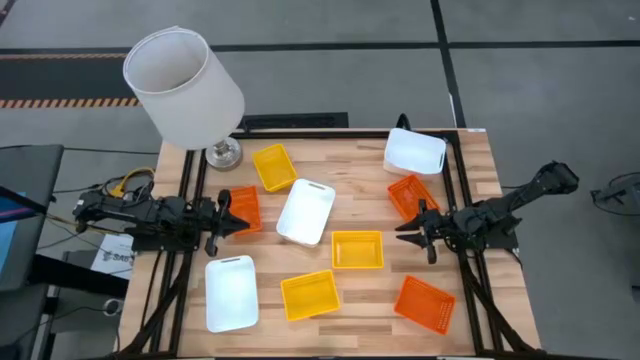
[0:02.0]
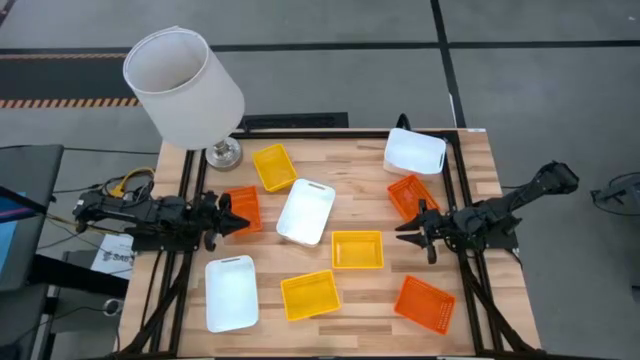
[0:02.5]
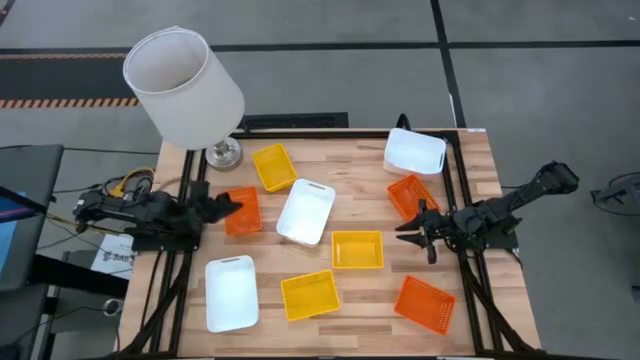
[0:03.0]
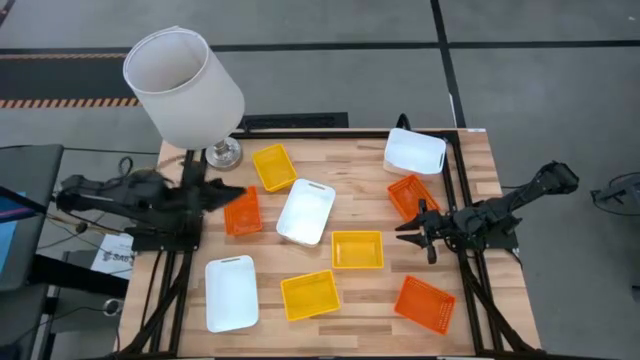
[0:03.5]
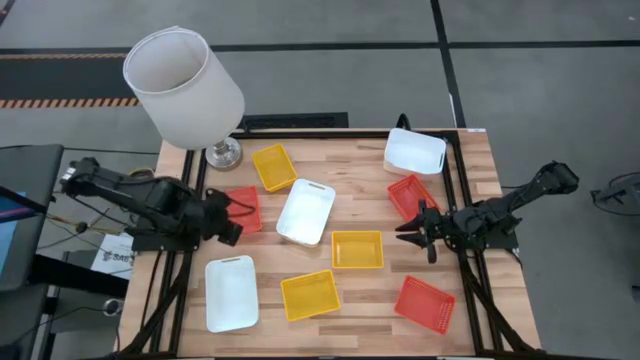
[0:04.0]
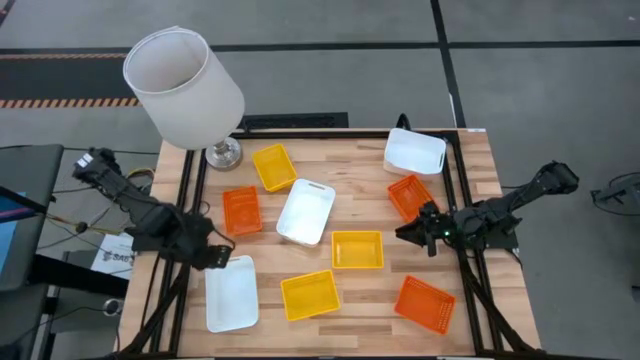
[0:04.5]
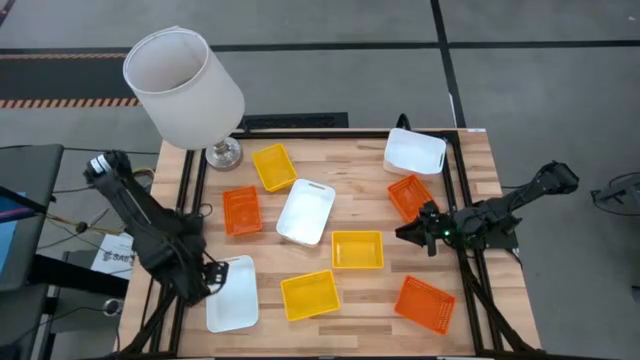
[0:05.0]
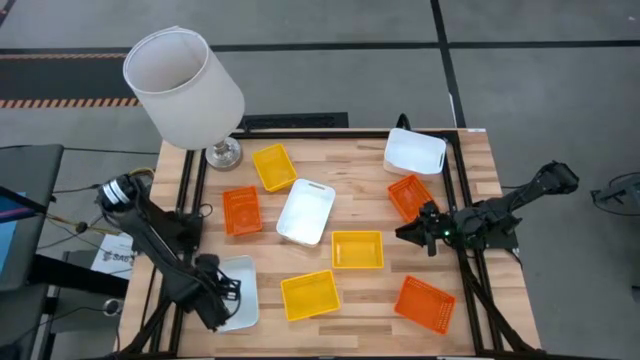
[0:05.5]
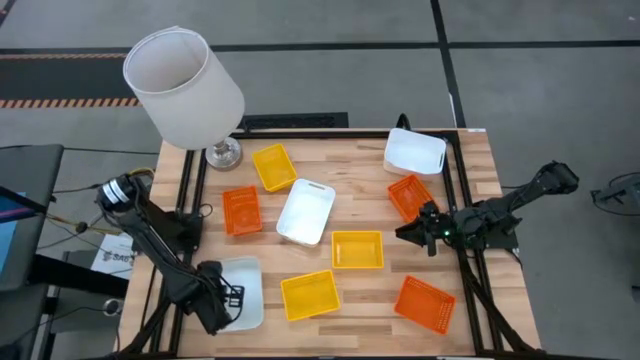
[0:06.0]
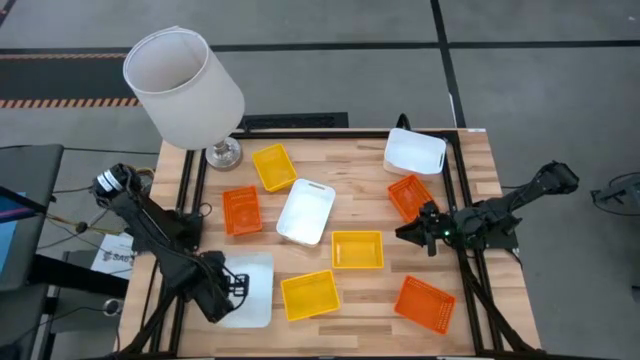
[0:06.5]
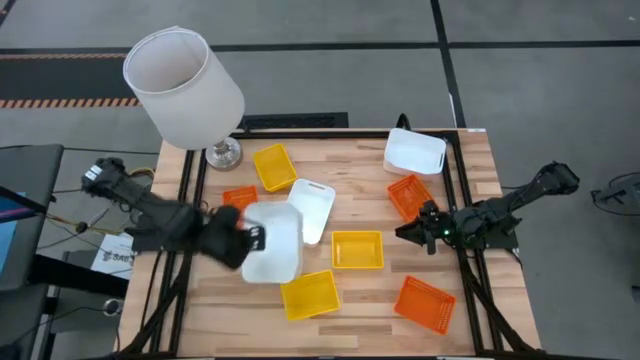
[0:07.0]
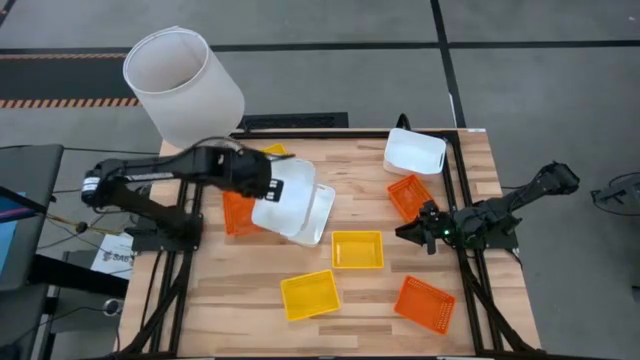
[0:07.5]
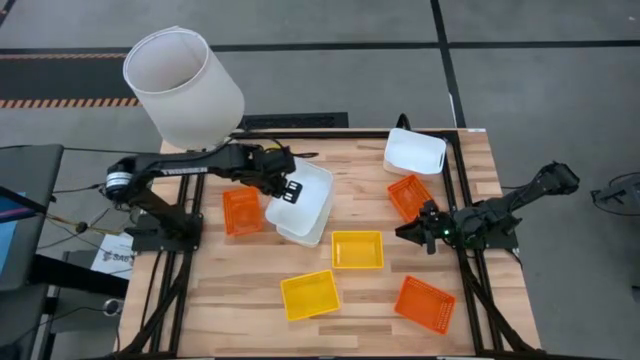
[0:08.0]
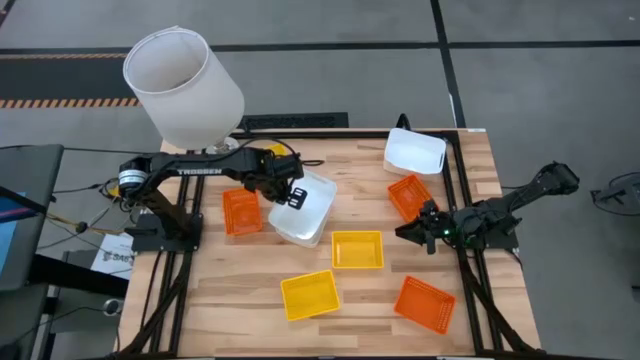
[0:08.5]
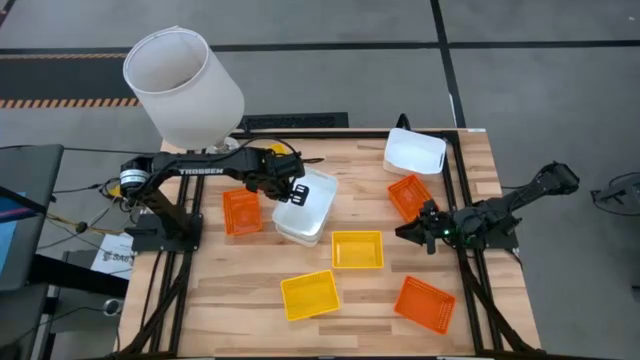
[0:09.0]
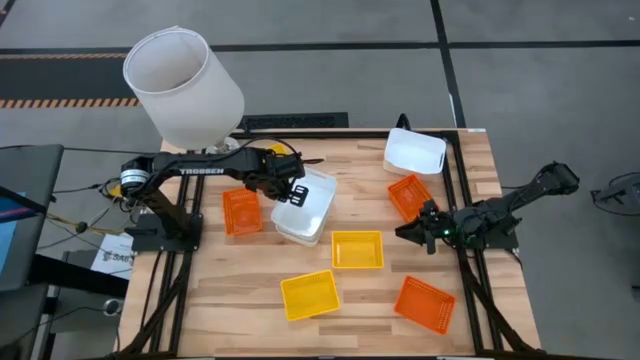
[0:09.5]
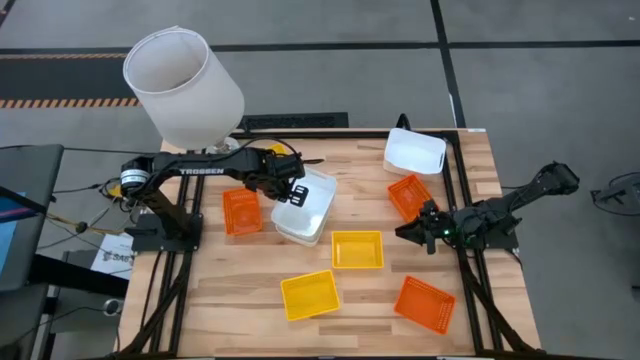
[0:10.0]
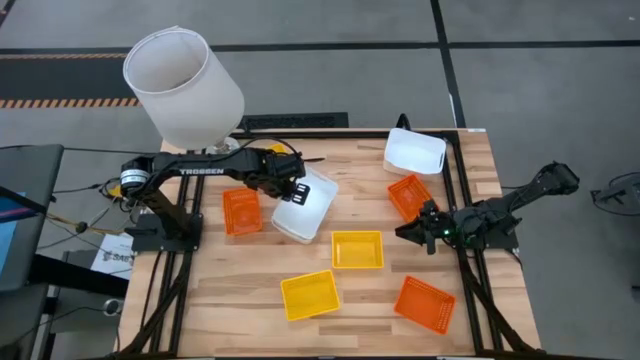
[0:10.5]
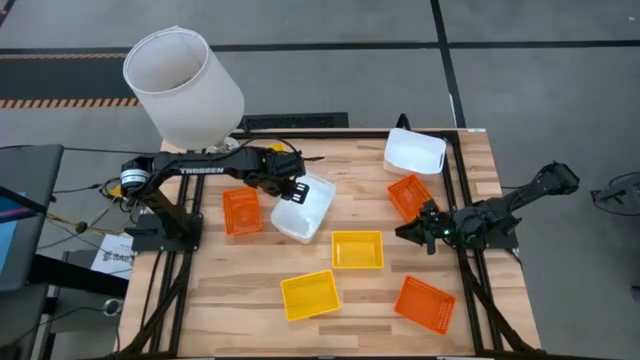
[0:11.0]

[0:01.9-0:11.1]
Stack the bottom white bin on top of the middle white bin

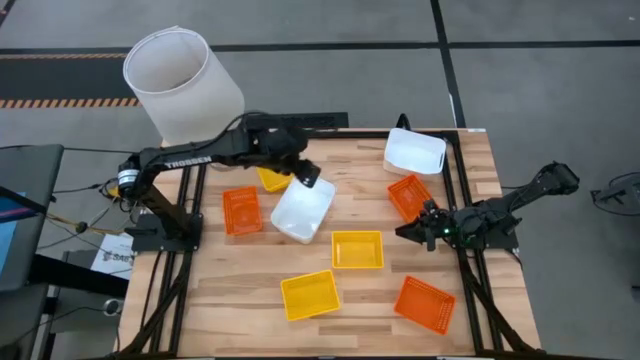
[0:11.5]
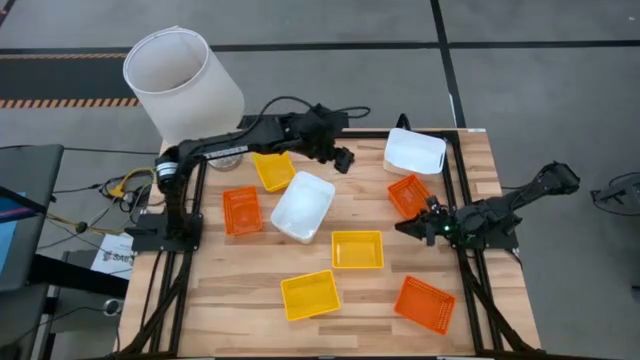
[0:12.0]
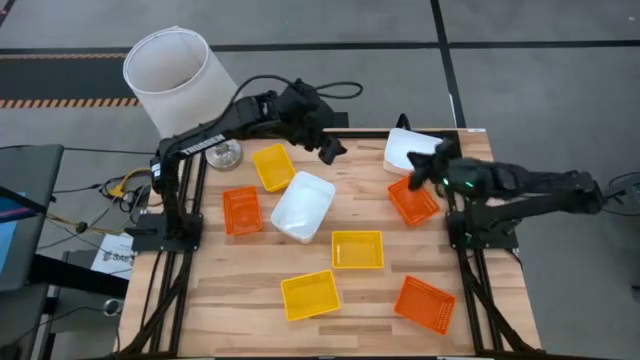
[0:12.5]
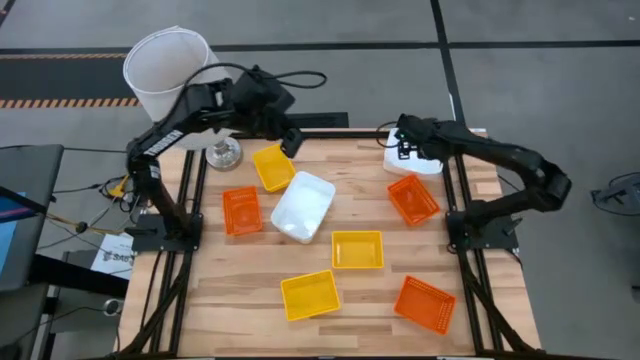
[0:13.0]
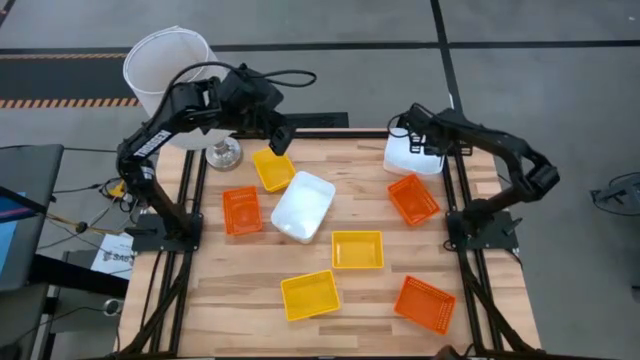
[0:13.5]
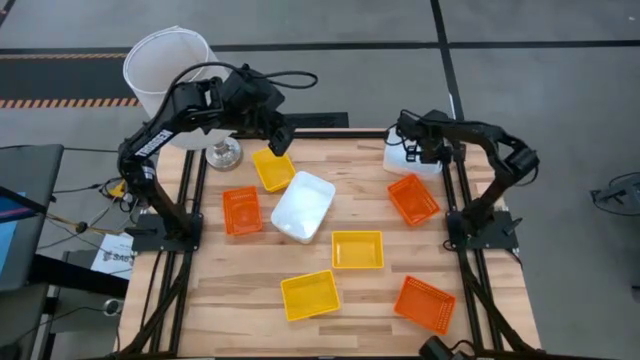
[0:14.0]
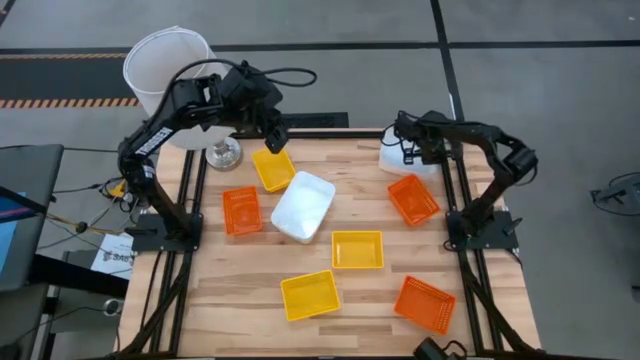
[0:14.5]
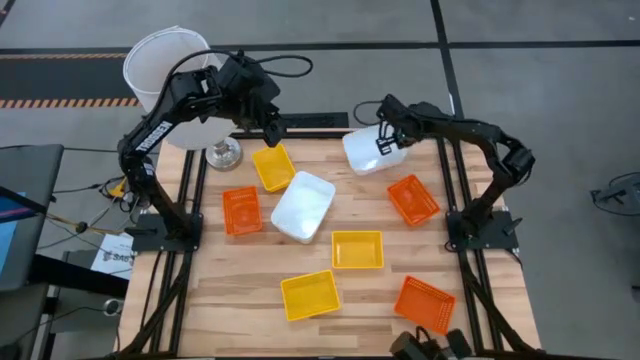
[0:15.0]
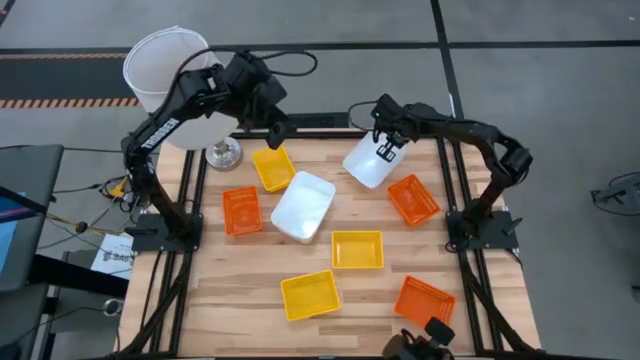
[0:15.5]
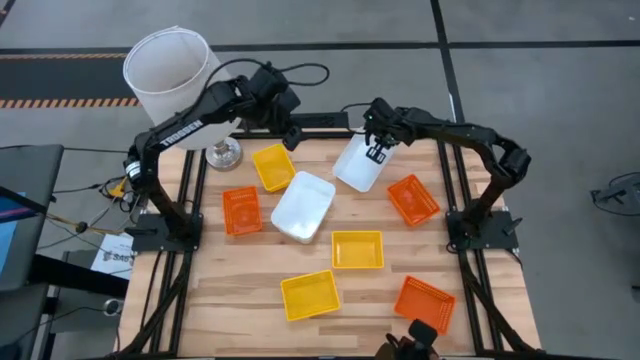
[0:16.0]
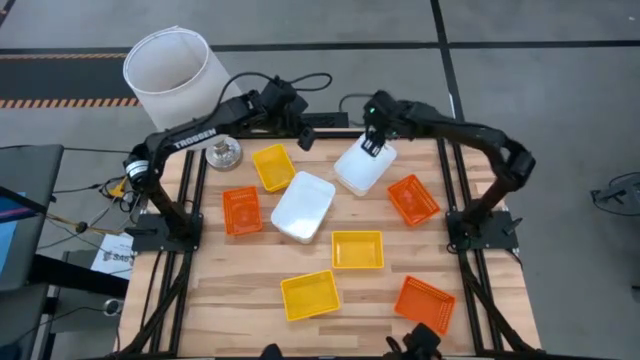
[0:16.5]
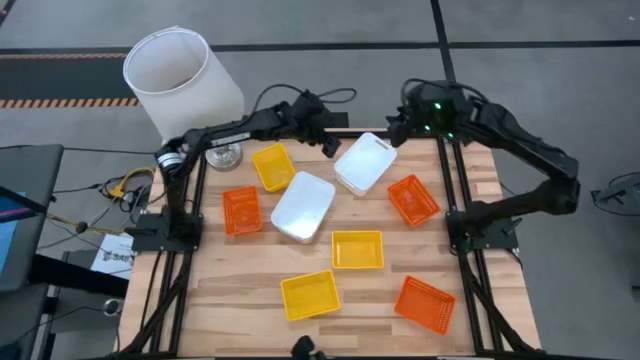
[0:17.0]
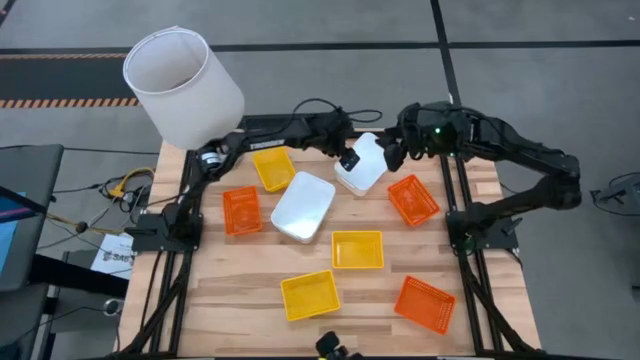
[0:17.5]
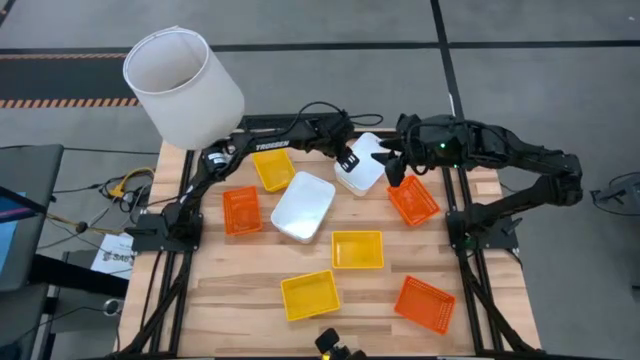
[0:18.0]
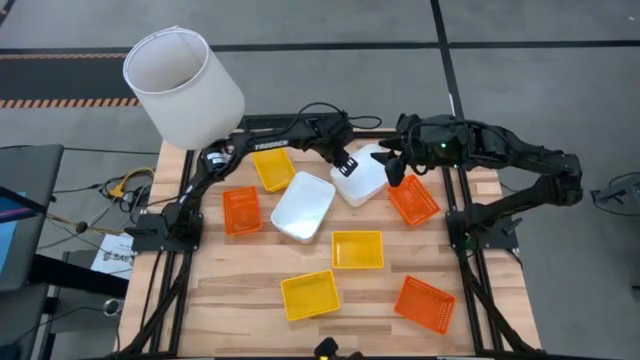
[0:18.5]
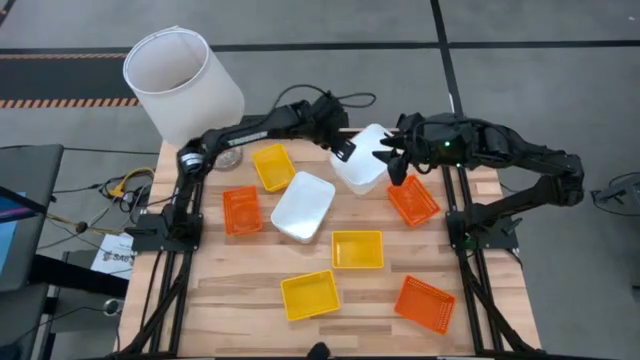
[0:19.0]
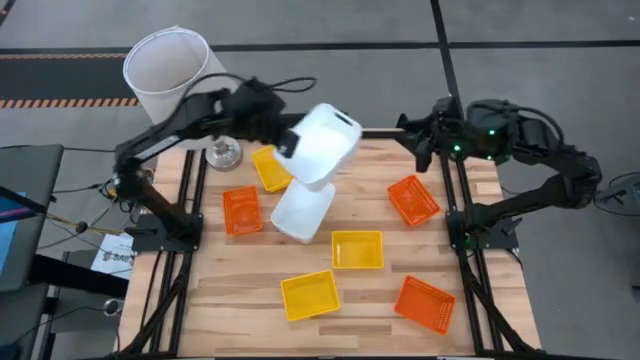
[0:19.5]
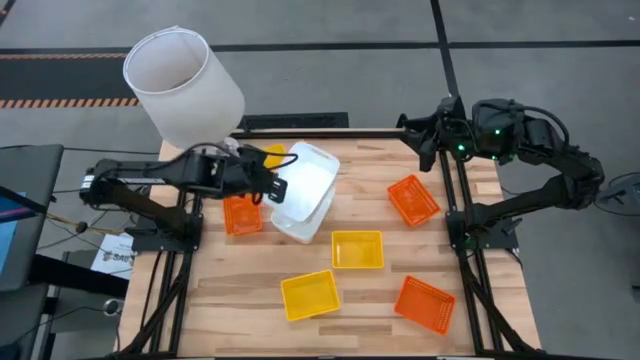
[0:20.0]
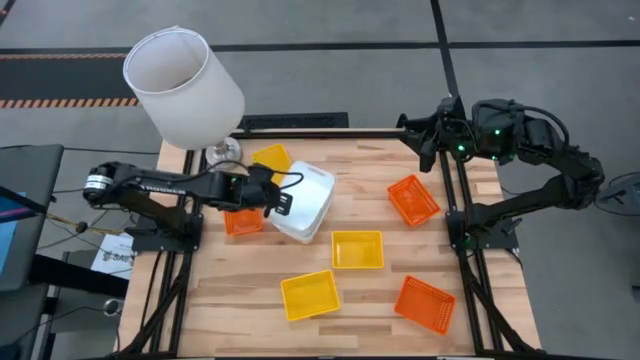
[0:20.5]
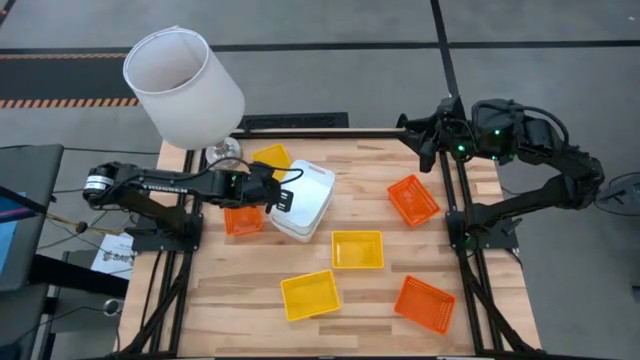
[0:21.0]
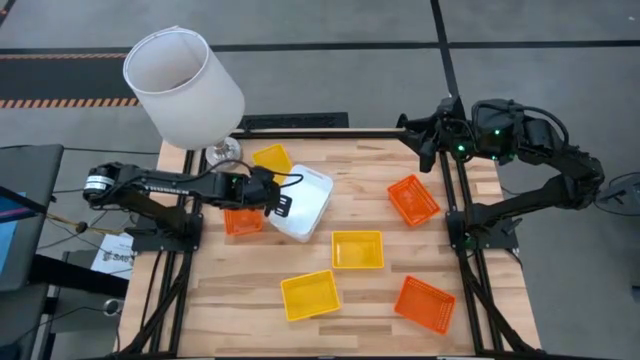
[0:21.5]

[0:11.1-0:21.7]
Stack the top white bin on top of the bottom white bin
